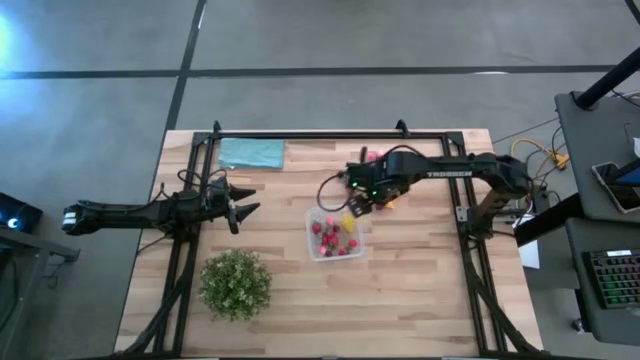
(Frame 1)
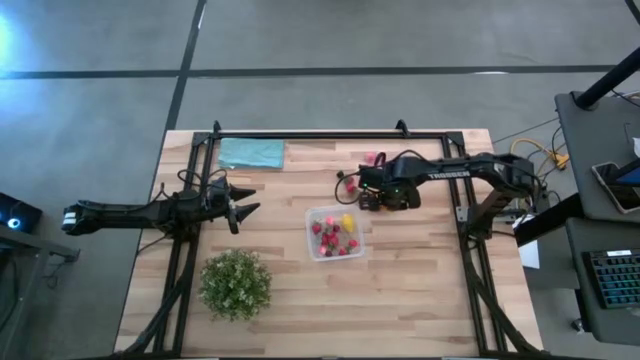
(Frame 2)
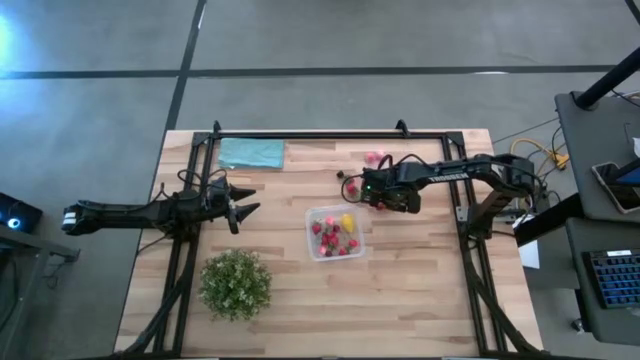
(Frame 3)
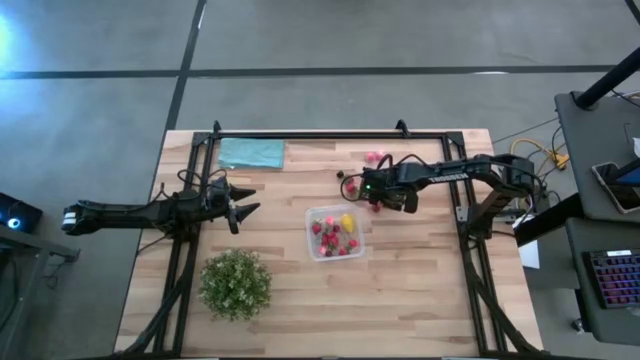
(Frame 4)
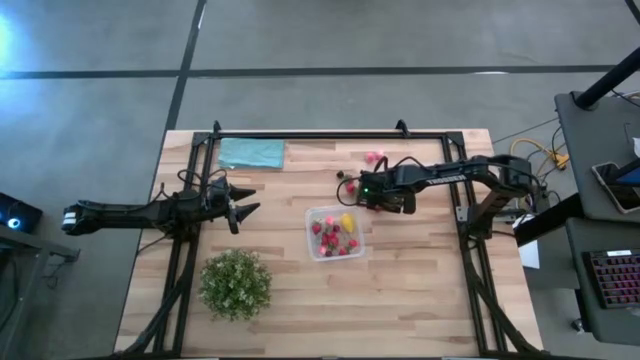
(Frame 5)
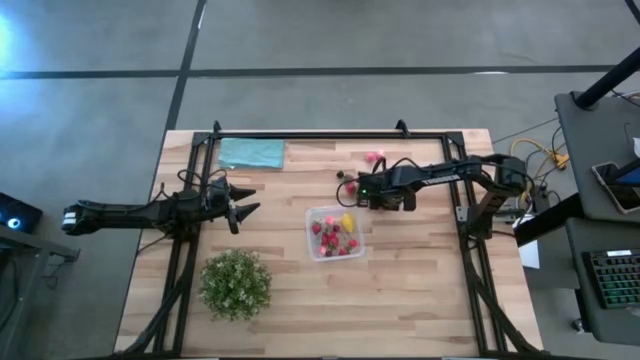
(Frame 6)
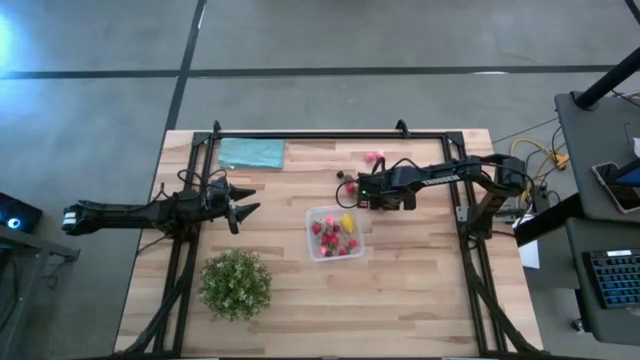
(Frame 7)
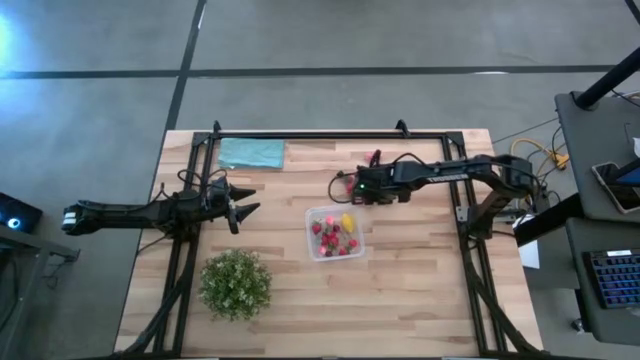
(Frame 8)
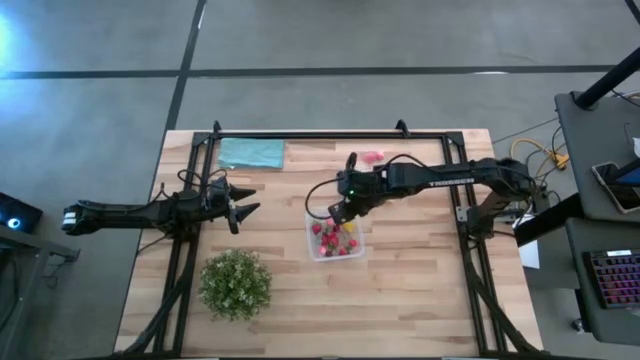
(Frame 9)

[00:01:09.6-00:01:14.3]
Task: Pick and placing Produce into tupperware
Put the cherry into the transparent container

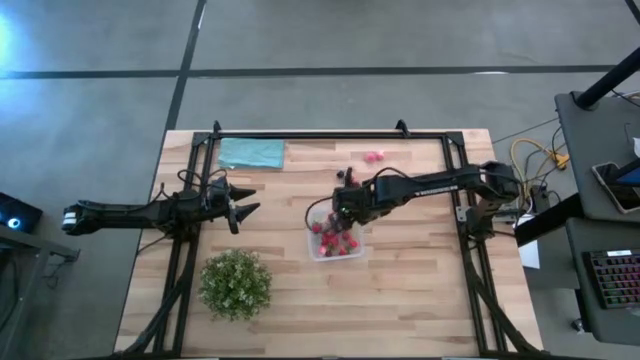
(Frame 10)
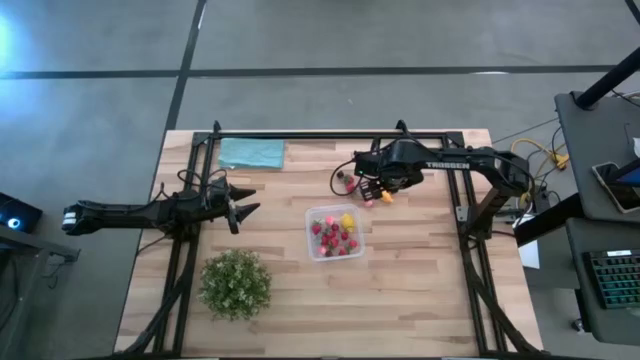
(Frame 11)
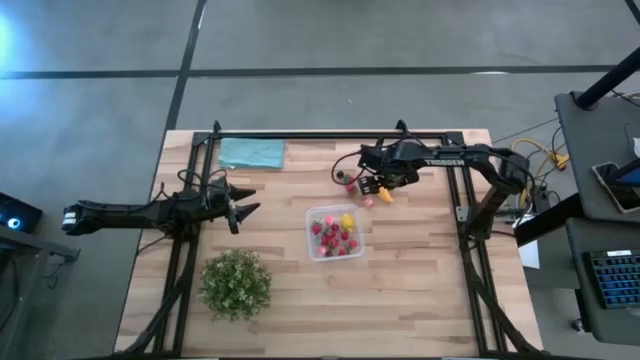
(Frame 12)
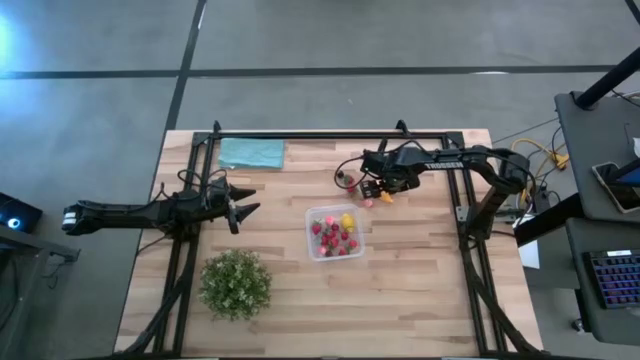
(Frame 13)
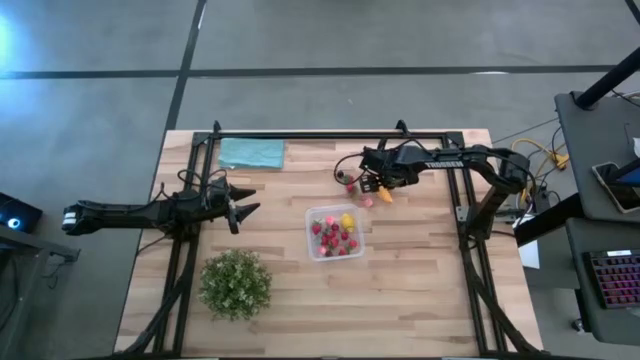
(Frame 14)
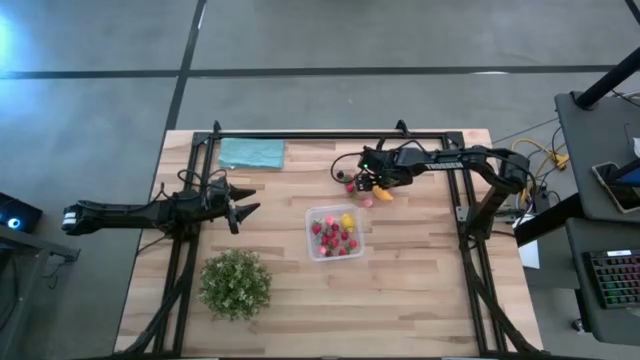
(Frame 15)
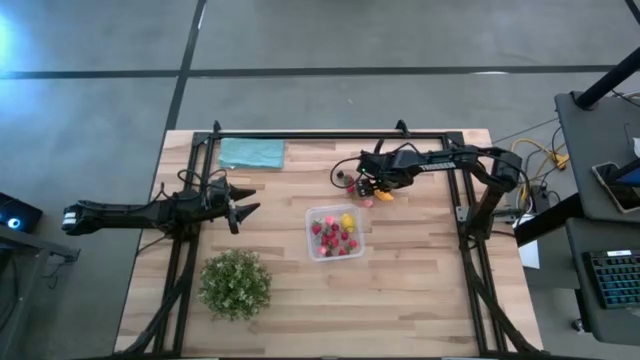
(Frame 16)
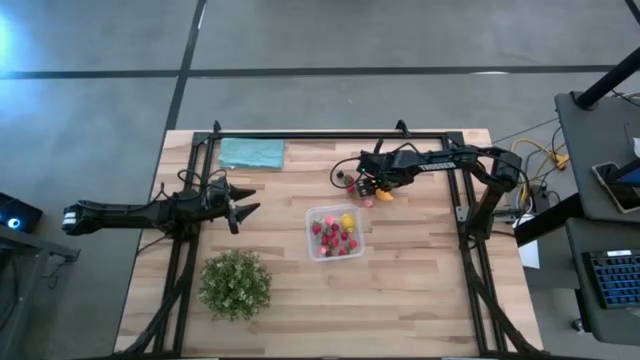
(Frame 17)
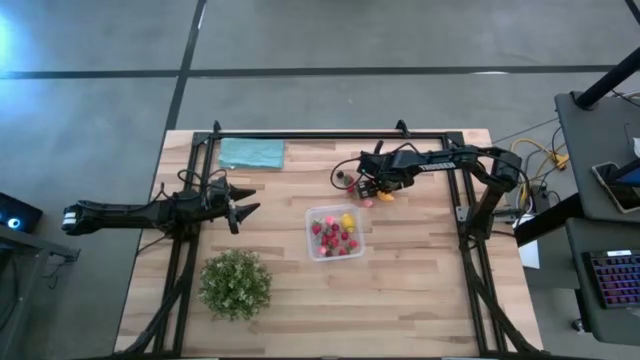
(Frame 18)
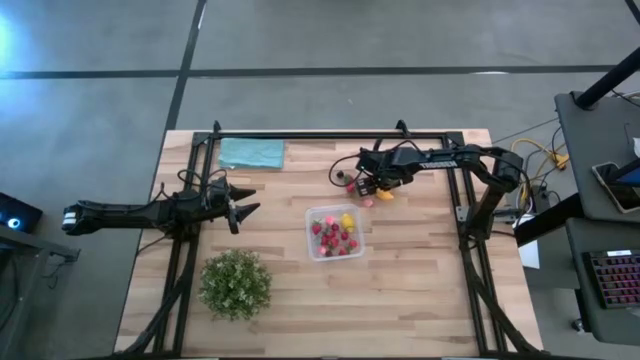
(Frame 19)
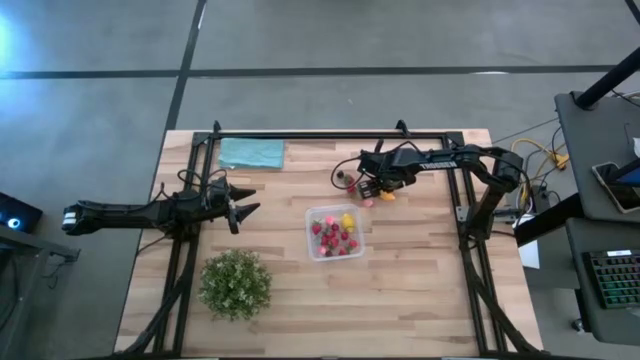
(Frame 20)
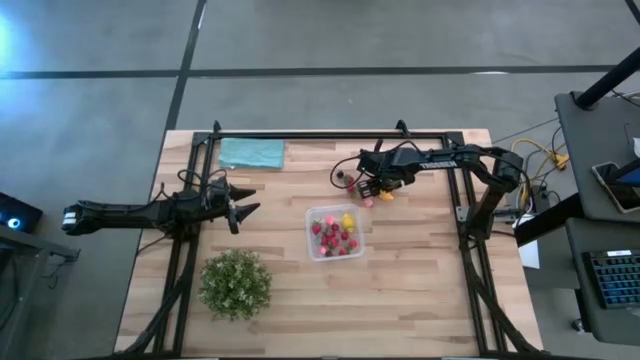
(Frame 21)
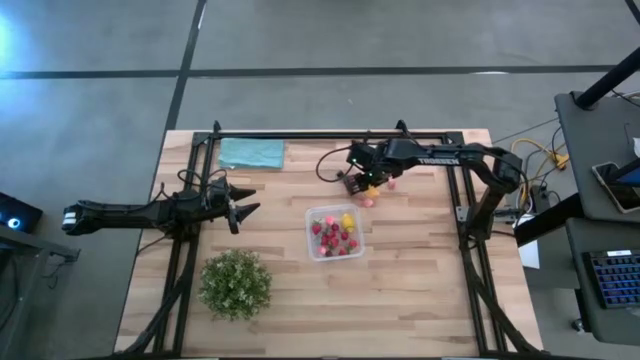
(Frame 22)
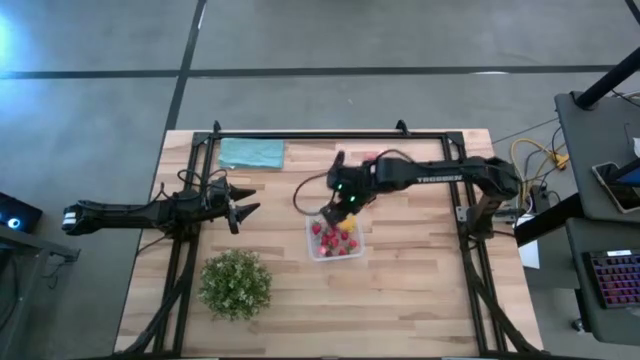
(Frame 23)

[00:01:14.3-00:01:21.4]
Put the banana into the transparent container

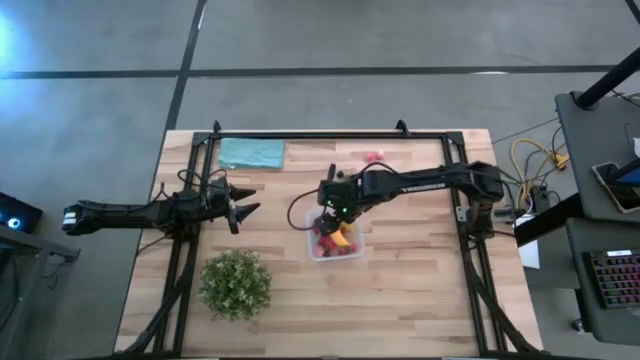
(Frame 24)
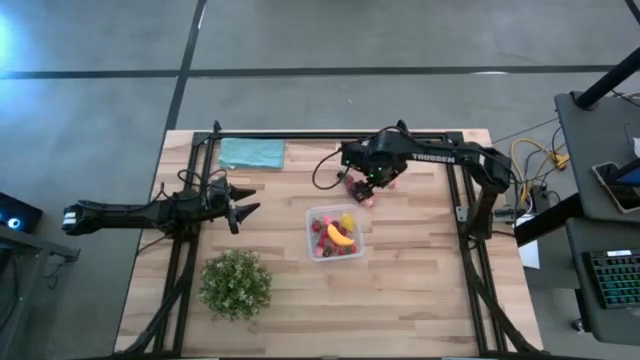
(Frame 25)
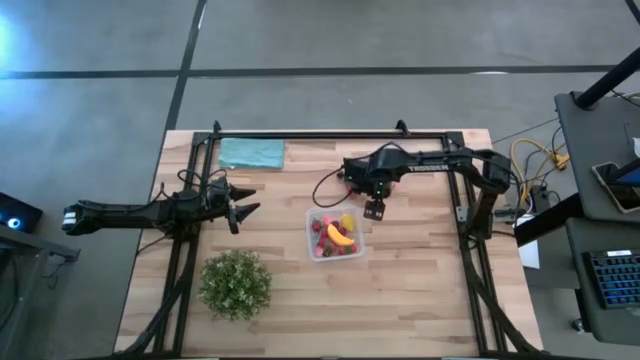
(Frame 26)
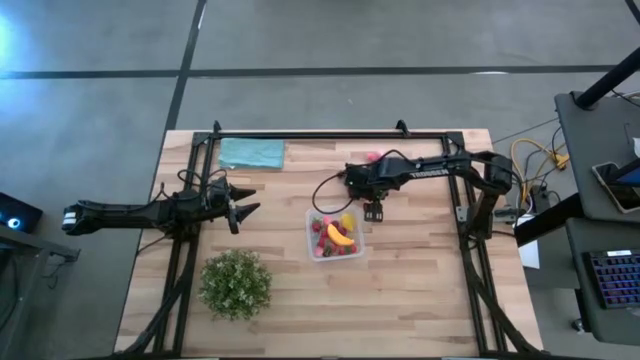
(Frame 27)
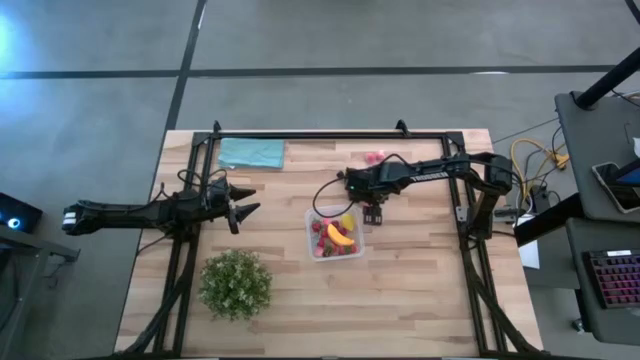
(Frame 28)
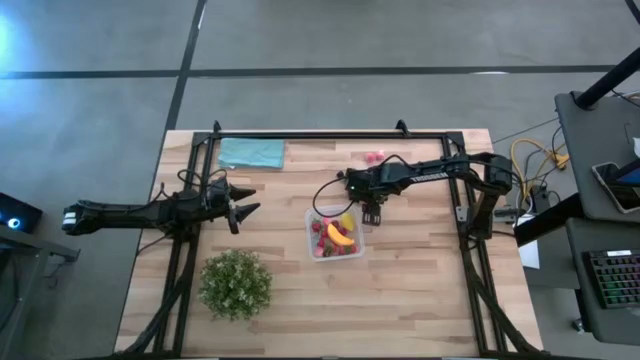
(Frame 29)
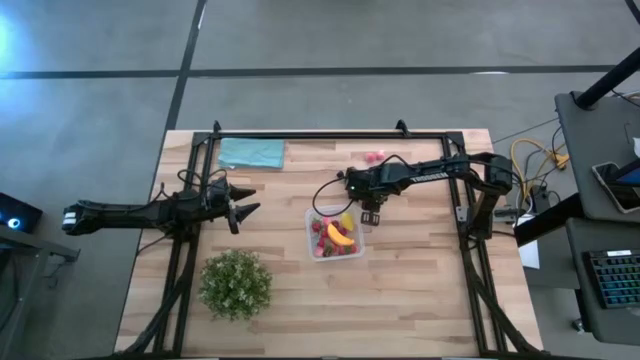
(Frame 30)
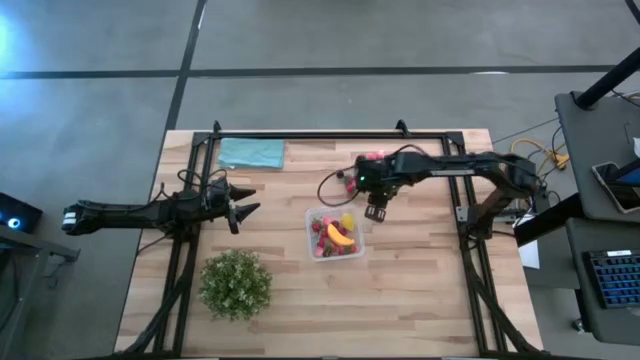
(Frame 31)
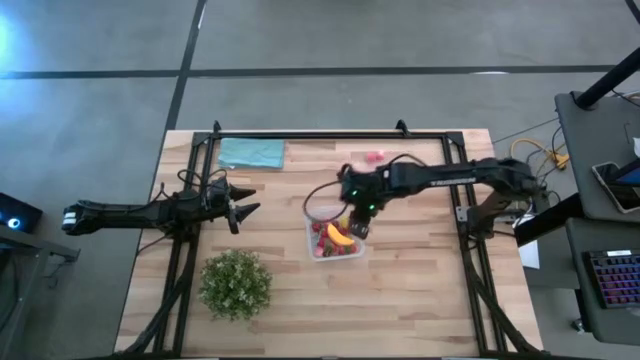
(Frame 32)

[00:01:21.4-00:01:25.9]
Put the peach into the transparent container

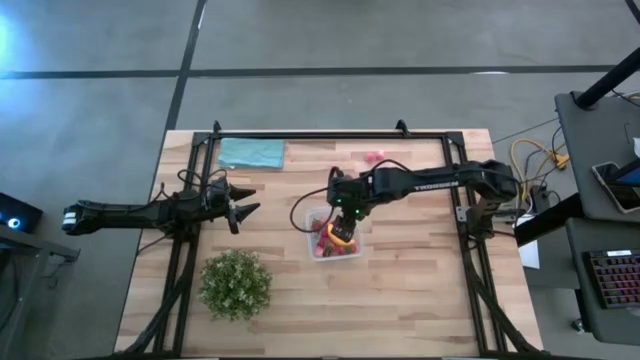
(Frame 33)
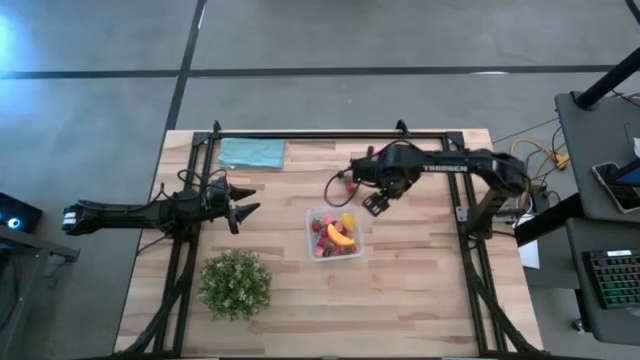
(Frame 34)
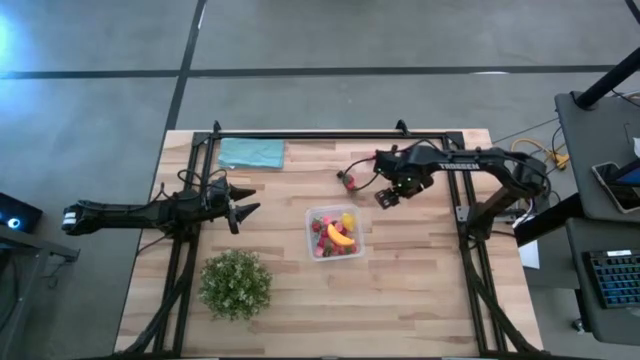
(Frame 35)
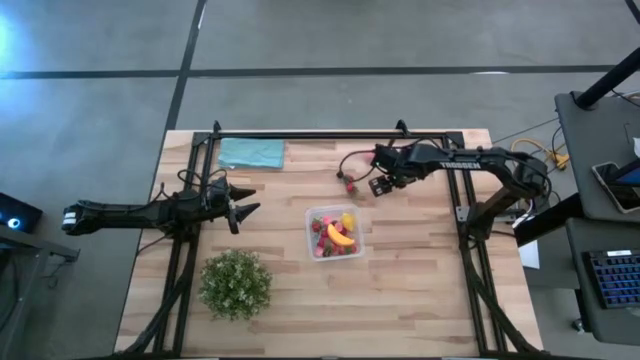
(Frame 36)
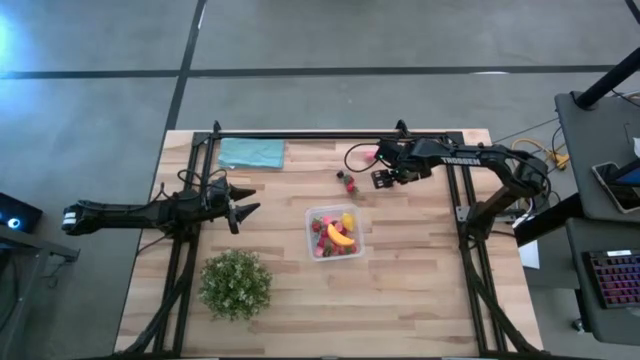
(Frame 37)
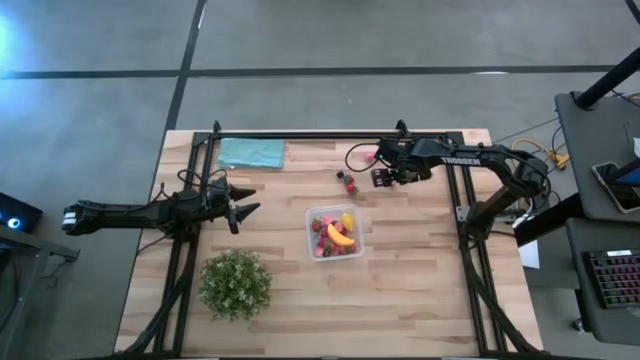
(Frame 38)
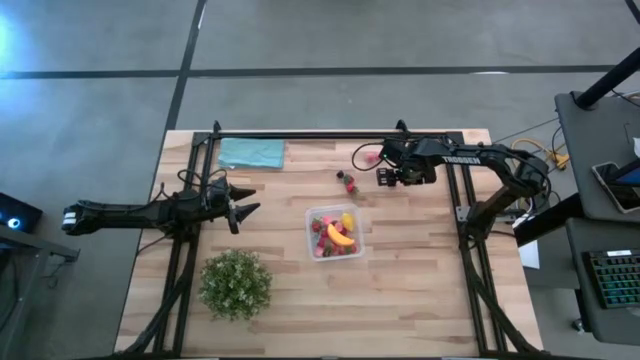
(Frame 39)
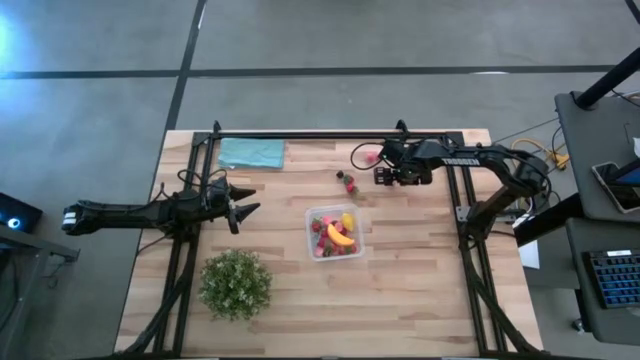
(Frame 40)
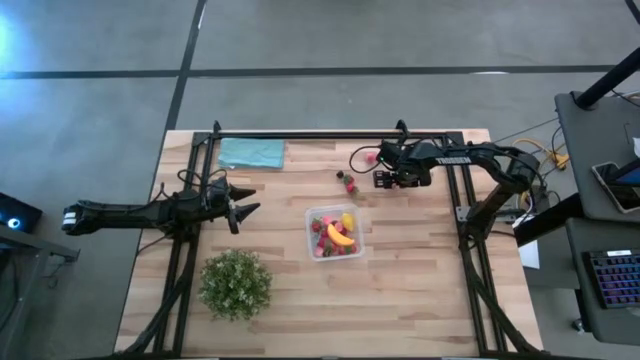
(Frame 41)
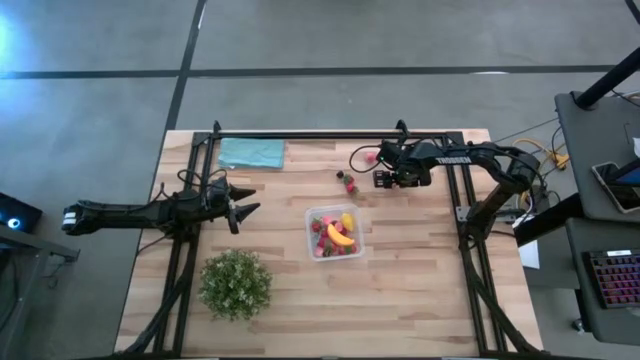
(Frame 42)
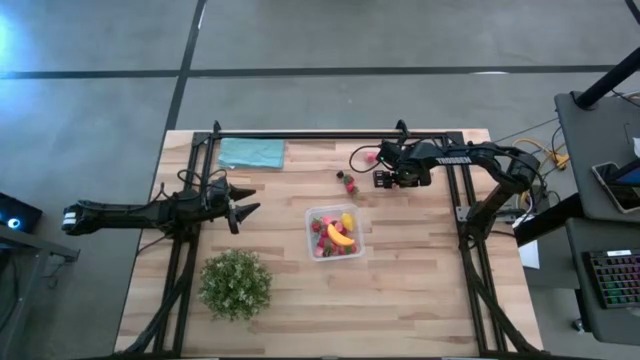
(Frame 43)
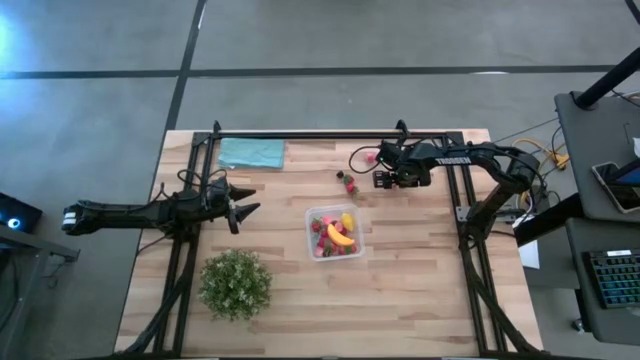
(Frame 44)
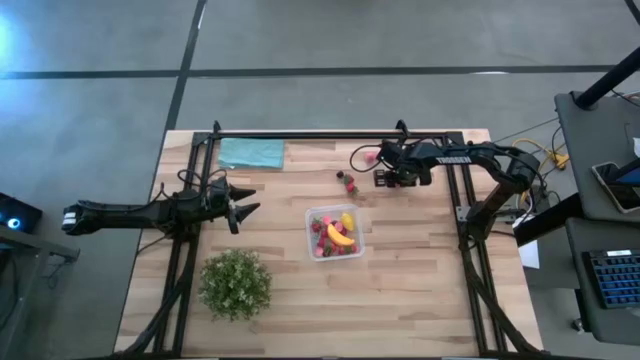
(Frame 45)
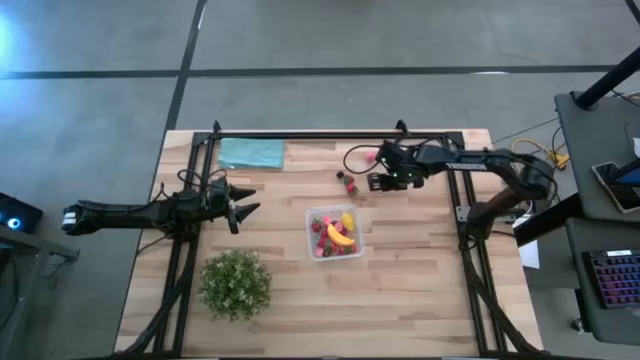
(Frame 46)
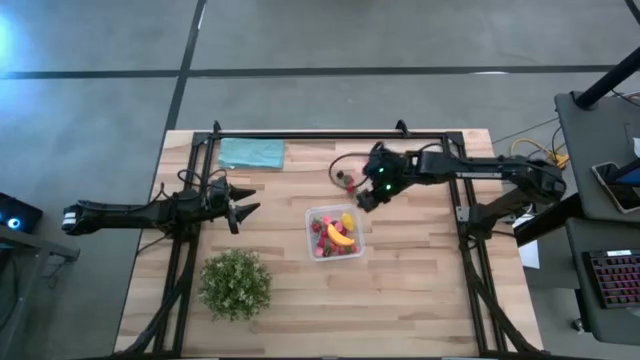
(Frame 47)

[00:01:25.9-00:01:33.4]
Put the peach into the transparent container
